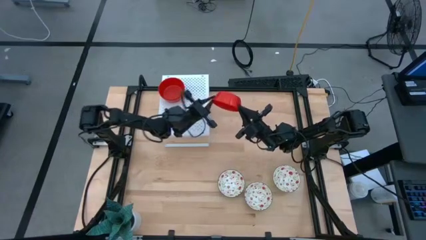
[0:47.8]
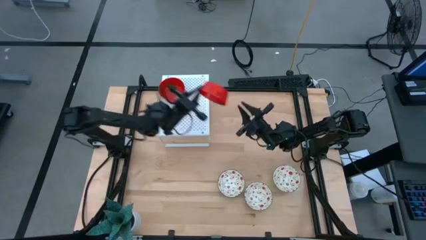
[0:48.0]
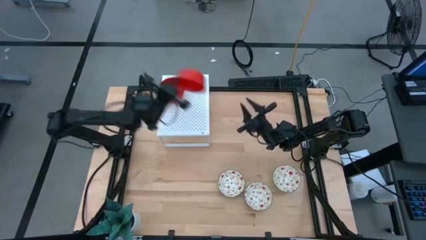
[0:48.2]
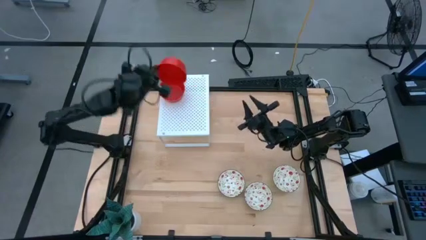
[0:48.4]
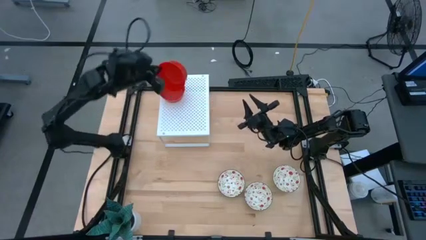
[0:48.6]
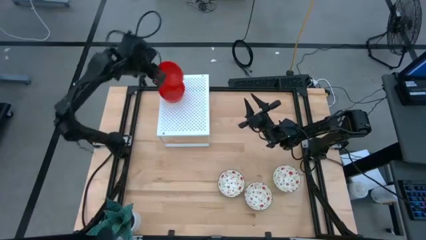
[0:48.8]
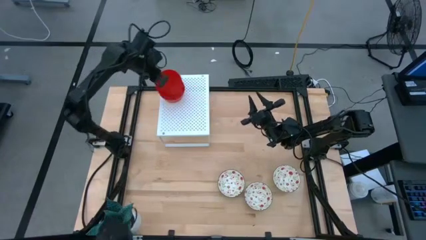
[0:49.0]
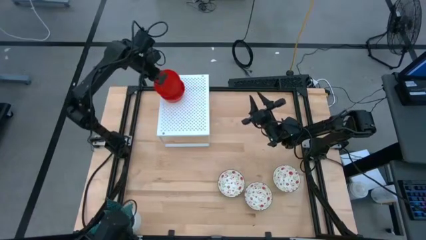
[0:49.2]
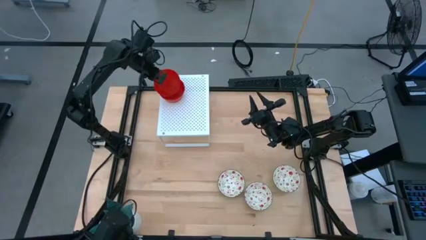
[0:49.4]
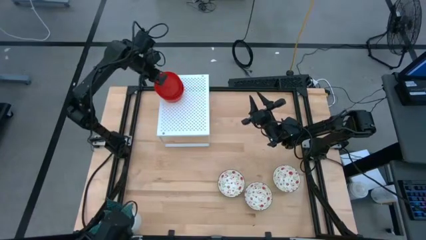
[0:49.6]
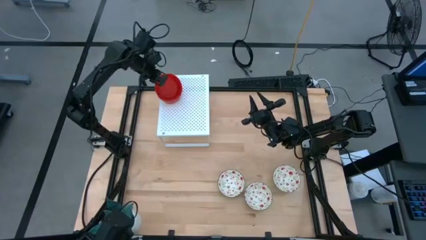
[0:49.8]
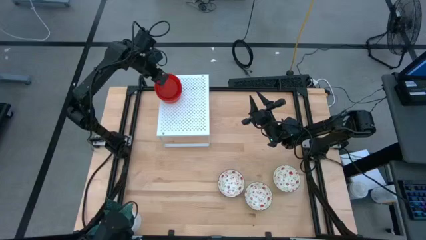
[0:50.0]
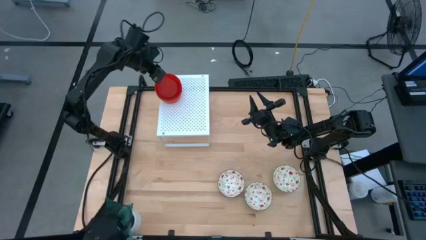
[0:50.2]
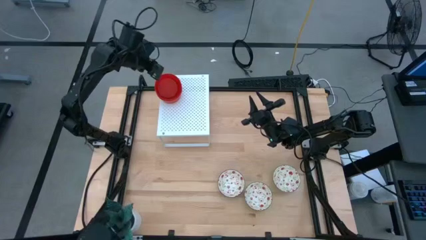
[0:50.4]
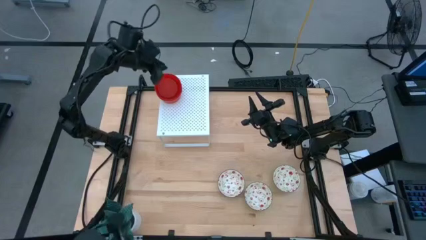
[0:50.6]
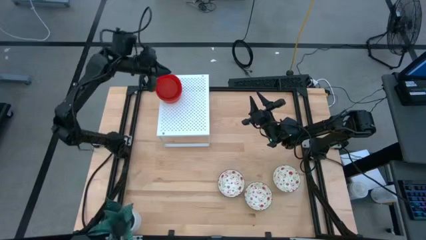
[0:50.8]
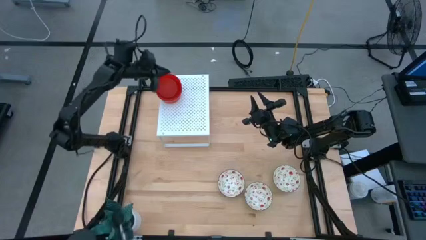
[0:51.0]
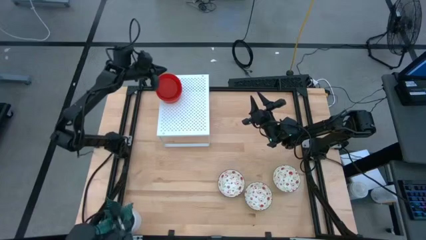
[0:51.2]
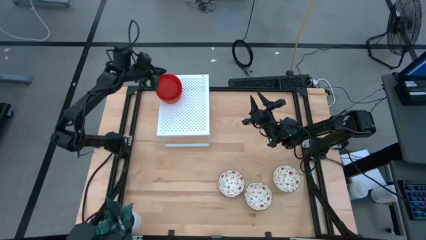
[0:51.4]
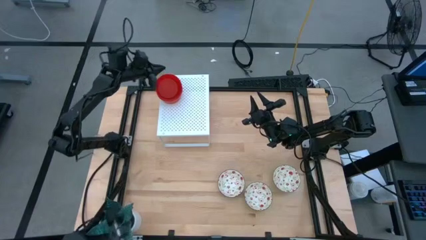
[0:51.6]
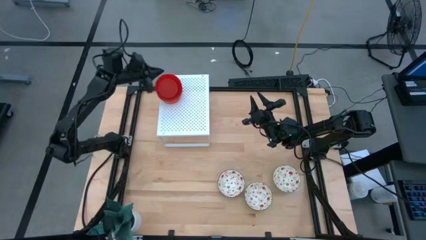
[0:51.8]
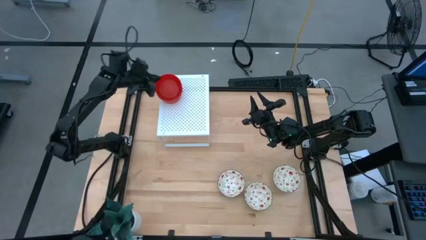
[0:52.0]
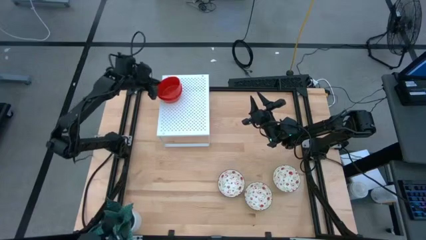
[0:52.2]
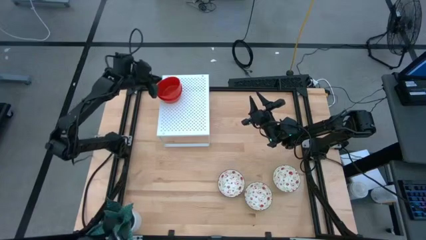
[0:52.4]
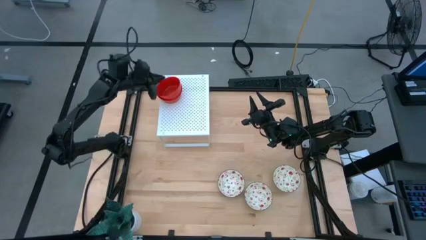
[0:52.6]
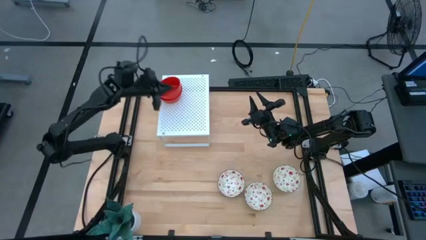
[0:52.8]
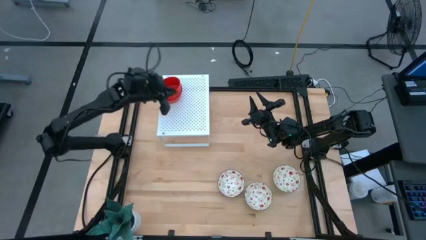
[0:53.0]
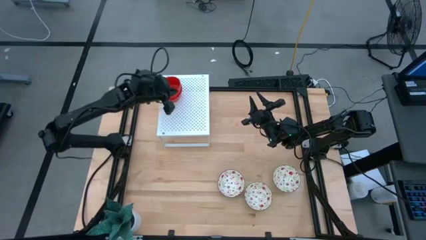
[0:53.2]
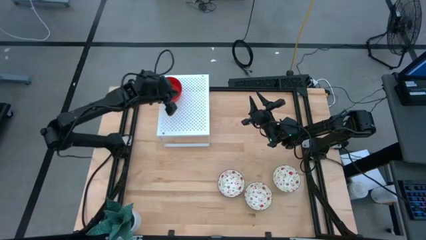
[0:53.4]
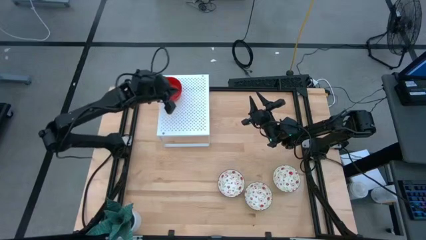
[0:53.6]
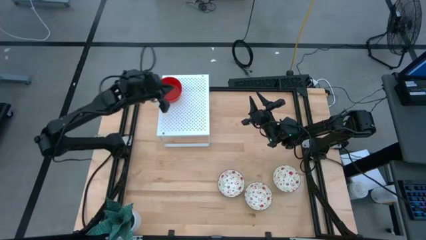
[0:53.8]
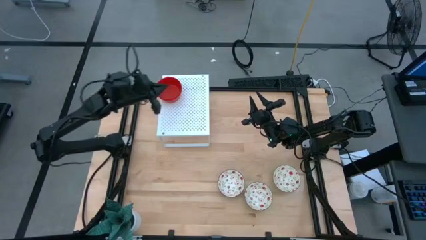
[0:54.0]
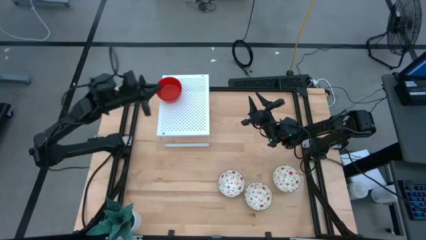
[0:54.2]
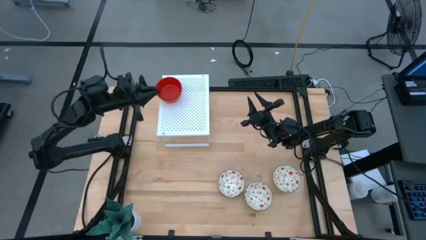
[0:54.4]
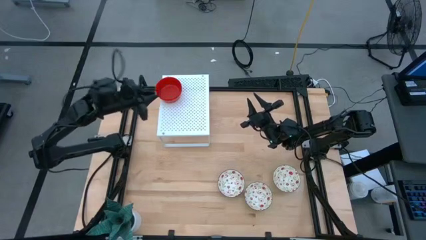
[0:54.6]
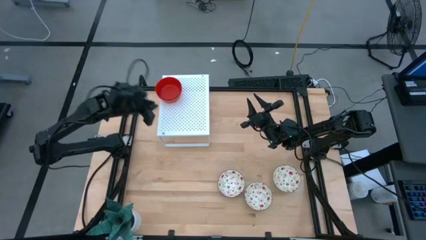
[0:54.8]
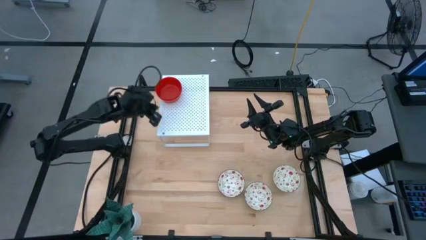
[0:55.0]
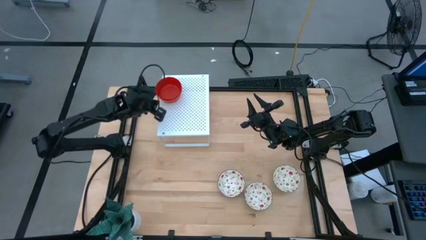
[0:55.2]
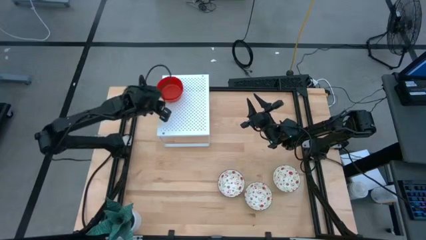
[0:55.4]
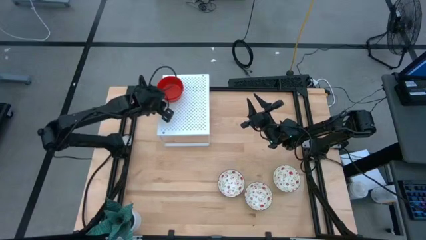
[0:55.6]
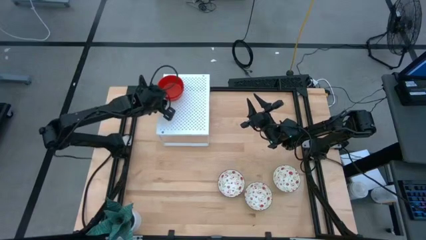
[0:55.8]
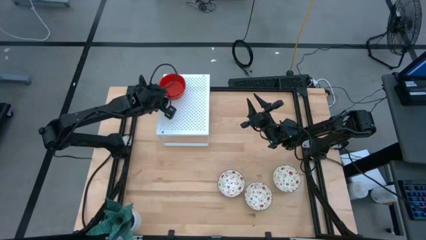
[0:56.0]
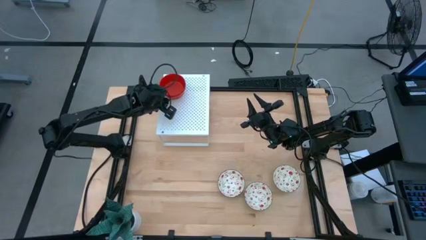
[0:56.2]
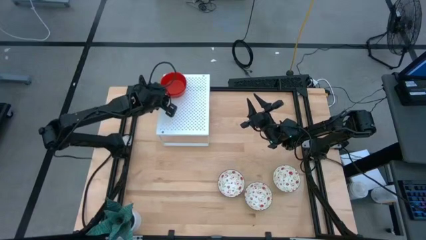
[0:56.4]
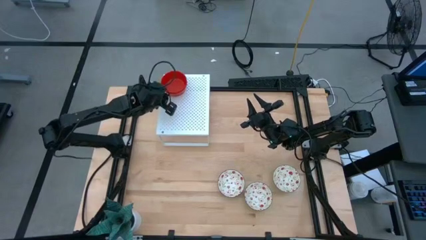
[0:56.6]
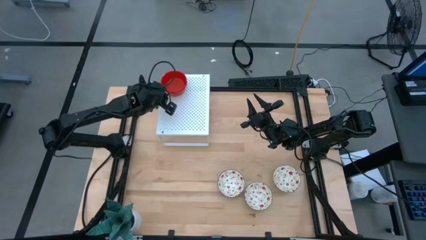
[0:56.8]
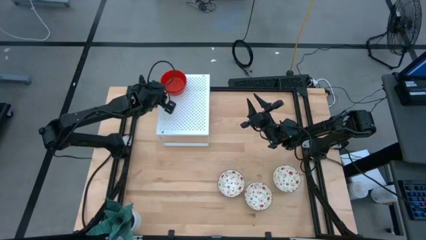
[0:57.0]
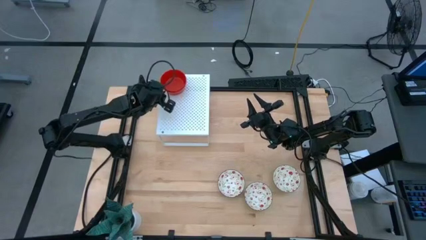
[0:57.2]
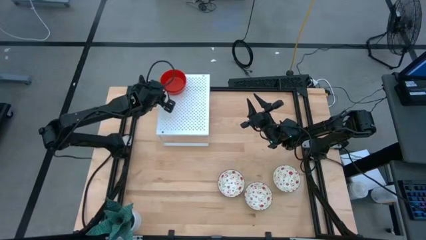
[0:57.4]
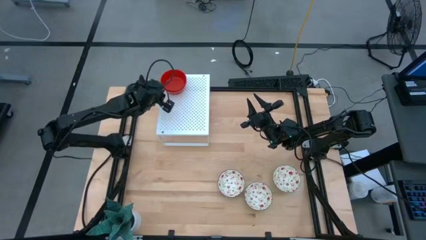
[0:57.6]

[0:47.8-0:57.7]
Task: Pick & Place Mini bowls
Stack the red bowl on top of the red bowls on the shelf

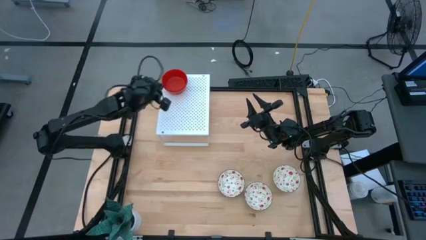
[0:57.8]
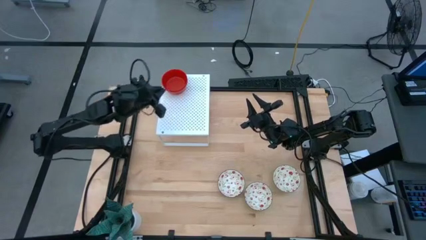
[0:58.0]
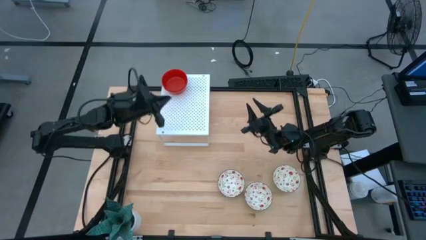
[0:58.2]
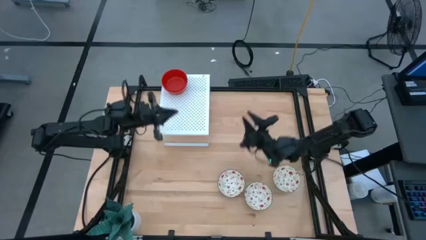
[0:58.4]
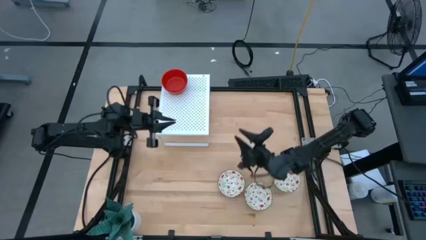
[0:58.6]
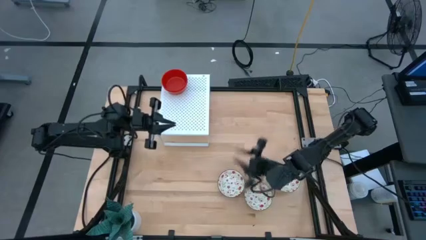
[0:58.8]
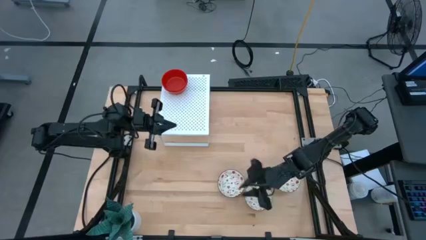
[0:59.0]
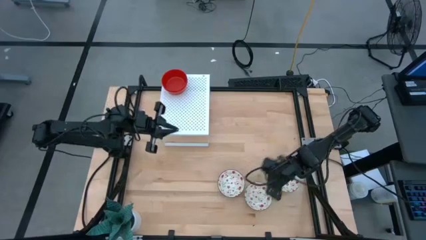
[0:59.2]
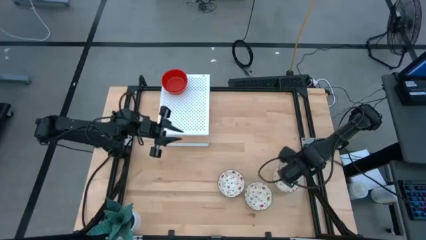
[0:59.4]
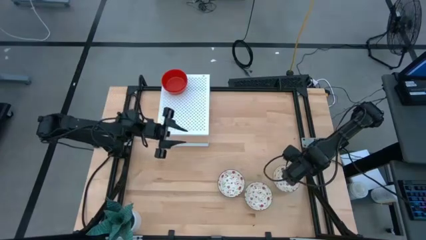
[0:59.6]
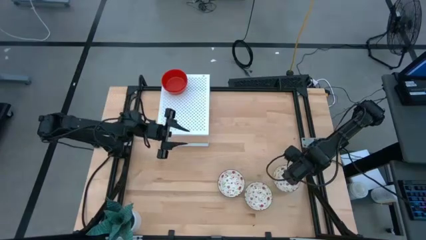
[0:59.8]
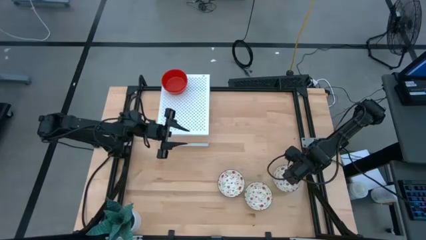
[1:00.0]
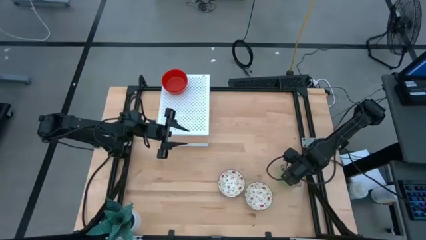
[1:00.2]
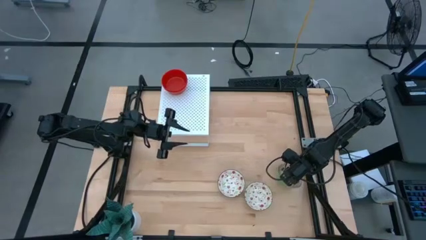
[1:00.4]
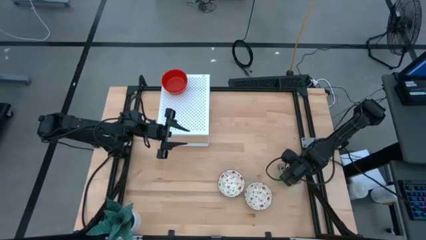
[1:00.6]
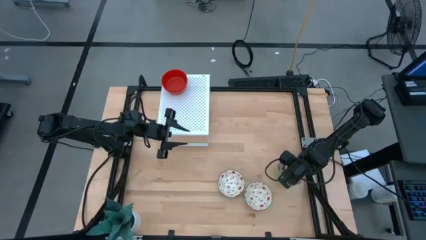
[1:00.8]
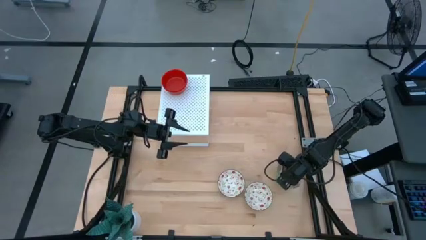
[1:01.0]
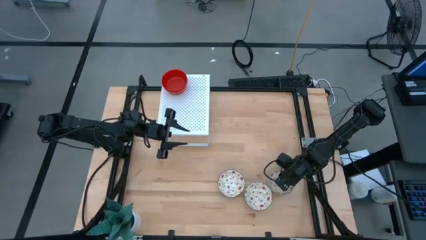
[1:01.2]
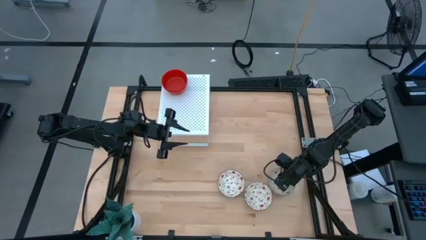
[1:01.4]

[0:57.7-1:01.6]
Put the right white patterned bowl on the shelf
